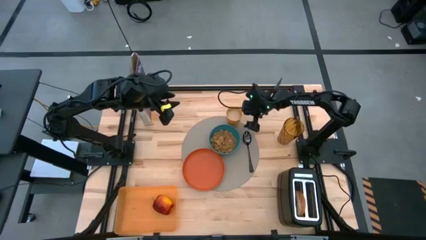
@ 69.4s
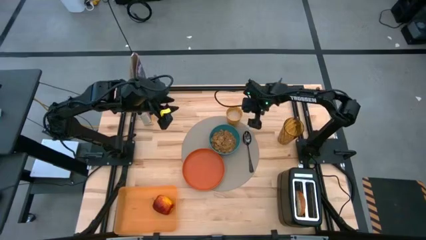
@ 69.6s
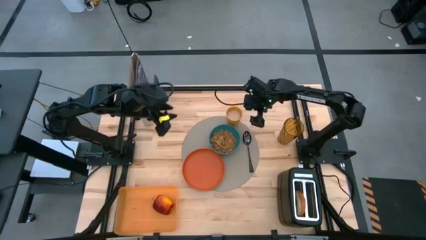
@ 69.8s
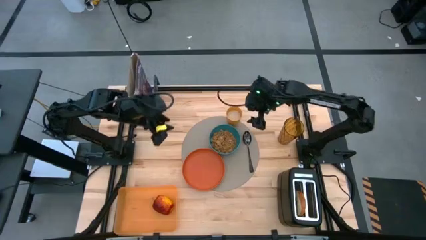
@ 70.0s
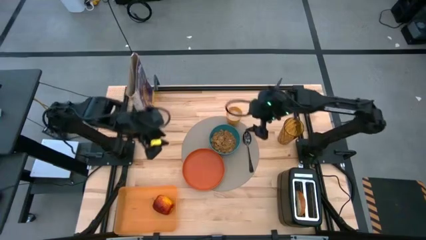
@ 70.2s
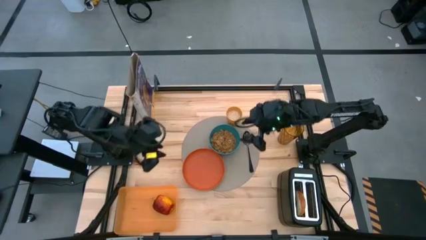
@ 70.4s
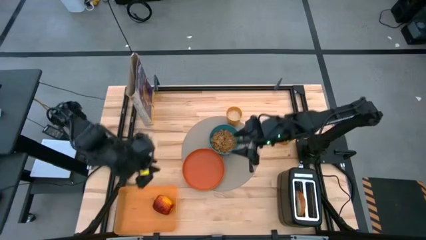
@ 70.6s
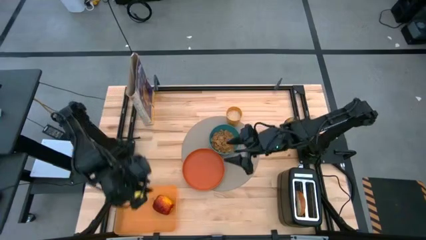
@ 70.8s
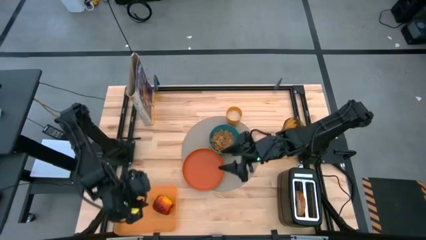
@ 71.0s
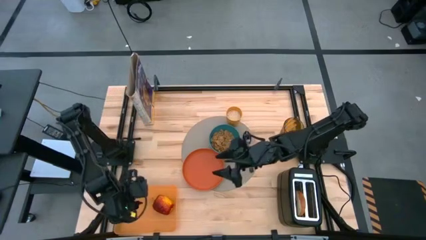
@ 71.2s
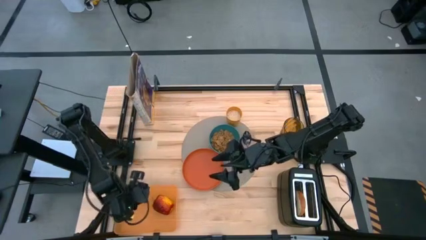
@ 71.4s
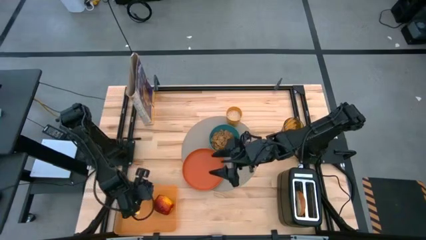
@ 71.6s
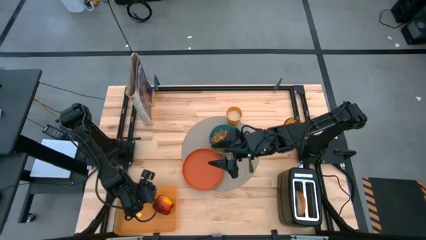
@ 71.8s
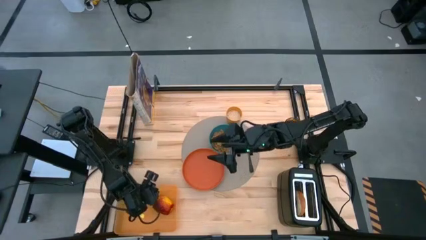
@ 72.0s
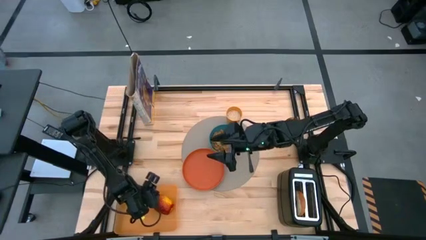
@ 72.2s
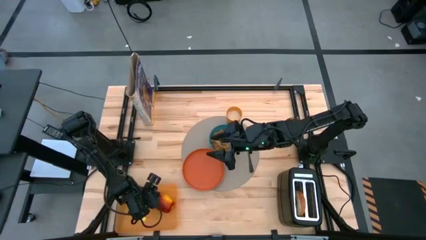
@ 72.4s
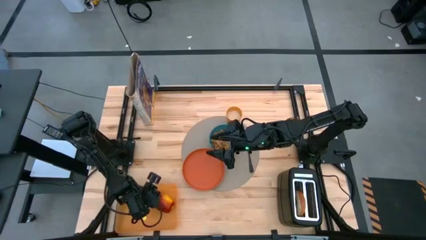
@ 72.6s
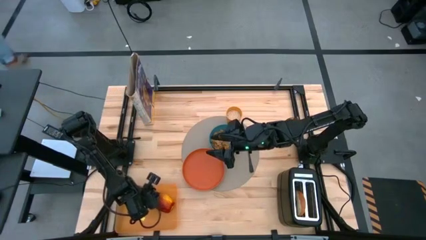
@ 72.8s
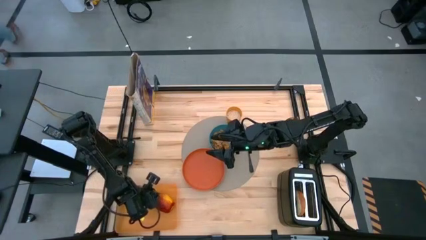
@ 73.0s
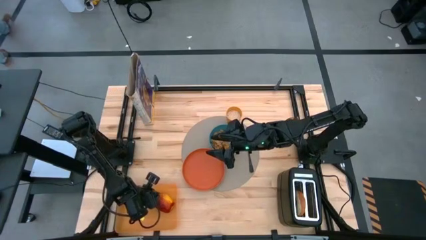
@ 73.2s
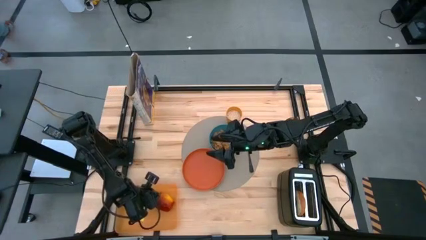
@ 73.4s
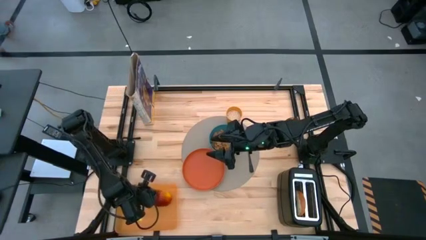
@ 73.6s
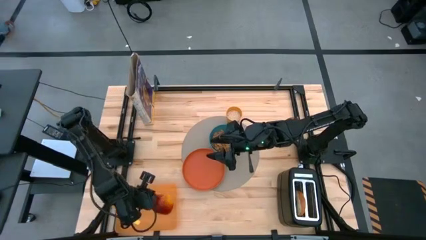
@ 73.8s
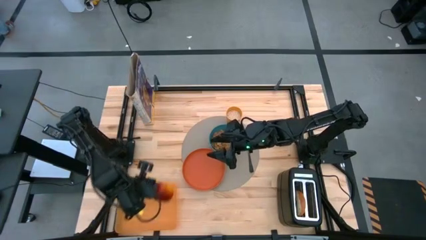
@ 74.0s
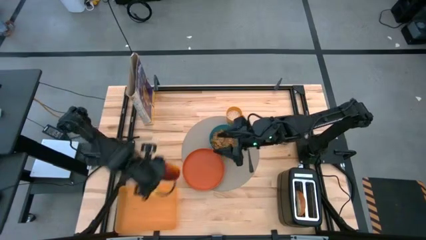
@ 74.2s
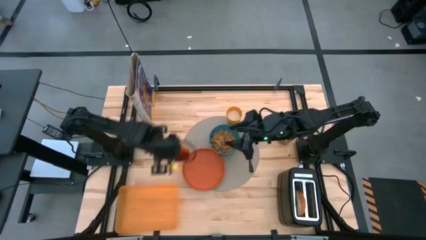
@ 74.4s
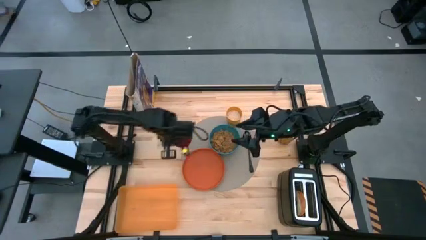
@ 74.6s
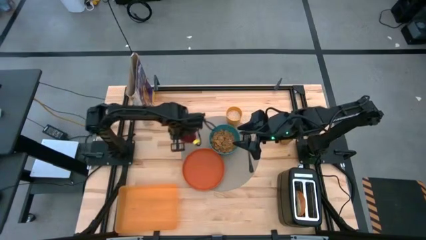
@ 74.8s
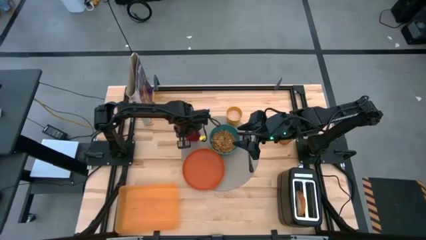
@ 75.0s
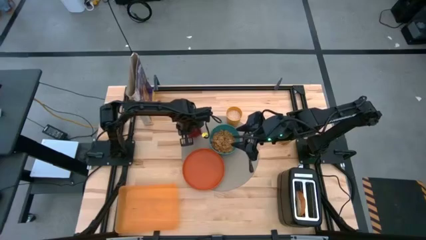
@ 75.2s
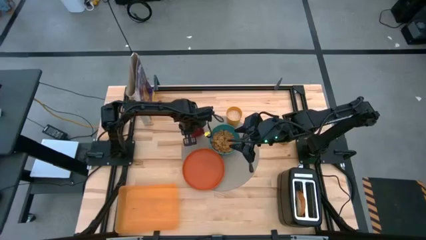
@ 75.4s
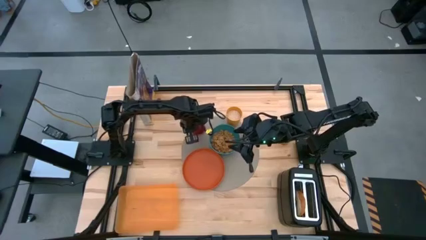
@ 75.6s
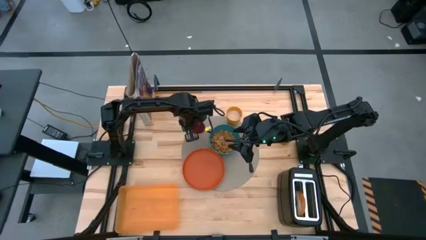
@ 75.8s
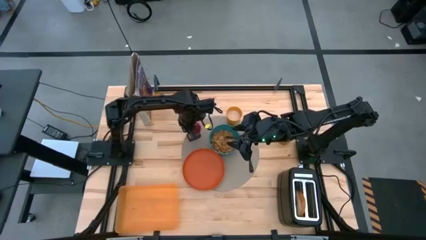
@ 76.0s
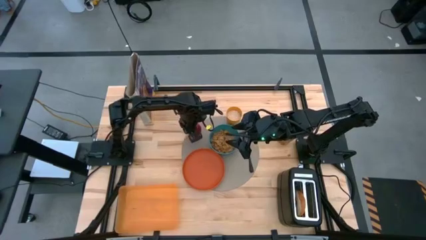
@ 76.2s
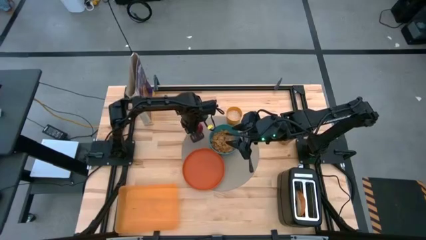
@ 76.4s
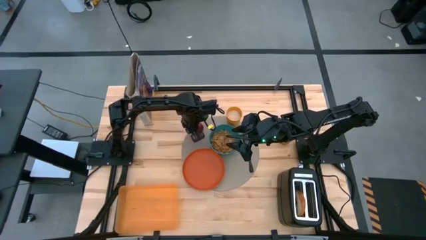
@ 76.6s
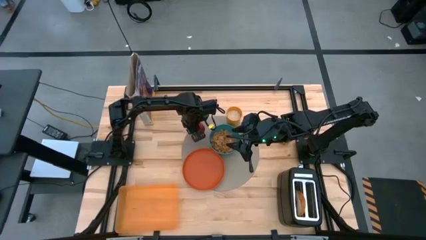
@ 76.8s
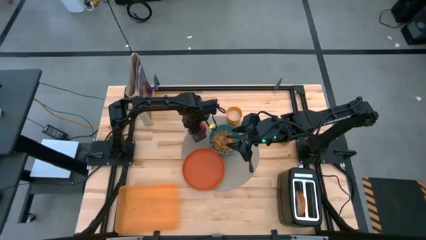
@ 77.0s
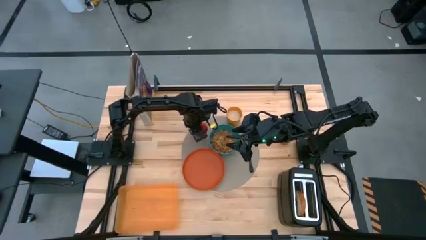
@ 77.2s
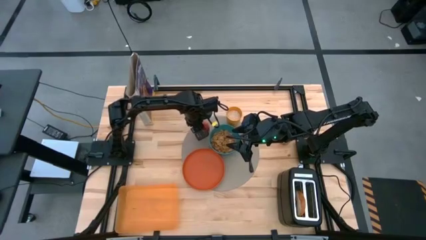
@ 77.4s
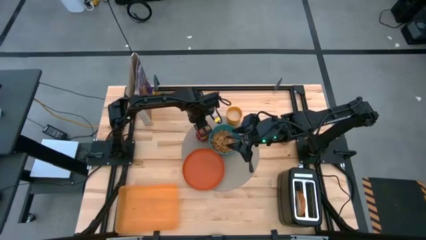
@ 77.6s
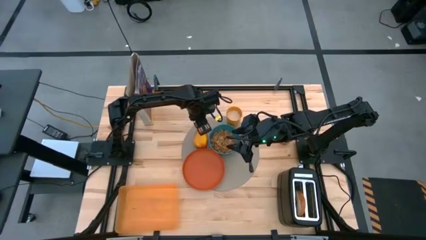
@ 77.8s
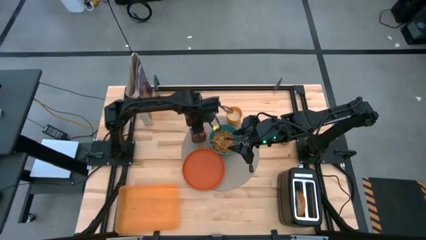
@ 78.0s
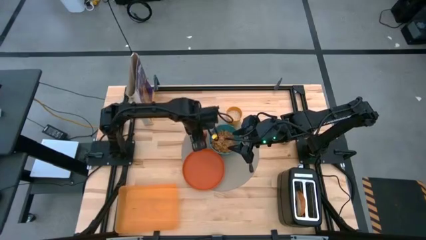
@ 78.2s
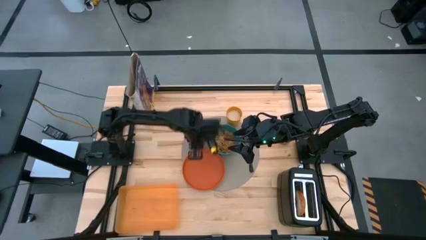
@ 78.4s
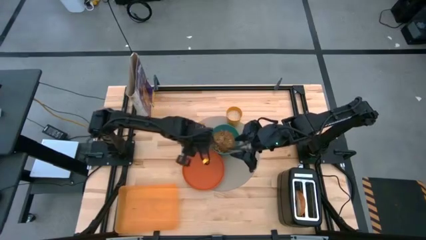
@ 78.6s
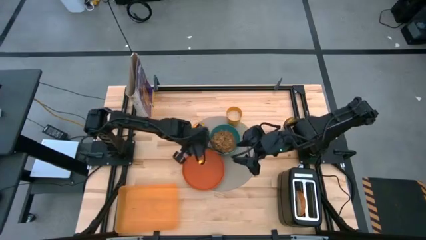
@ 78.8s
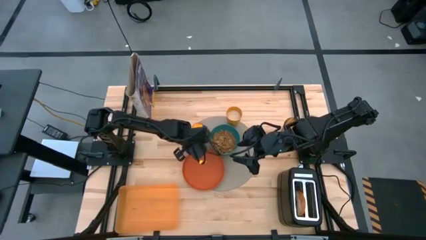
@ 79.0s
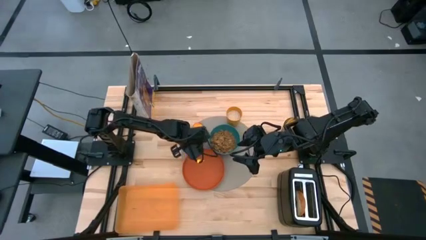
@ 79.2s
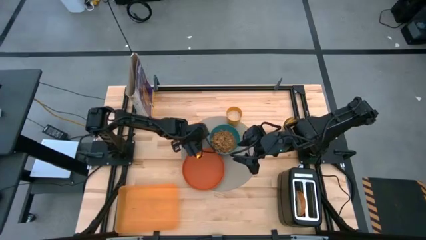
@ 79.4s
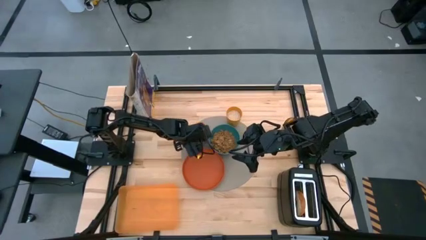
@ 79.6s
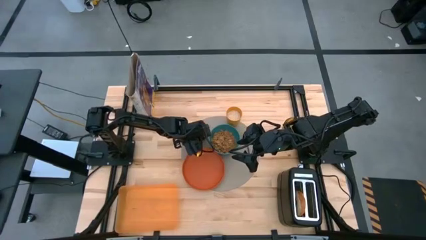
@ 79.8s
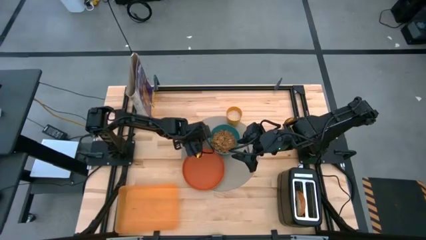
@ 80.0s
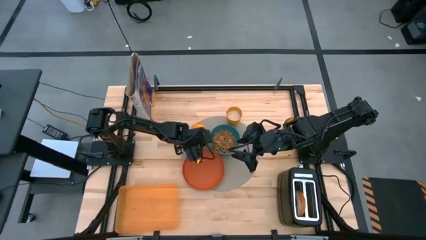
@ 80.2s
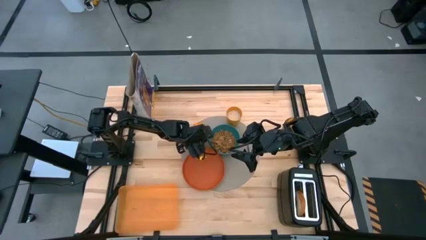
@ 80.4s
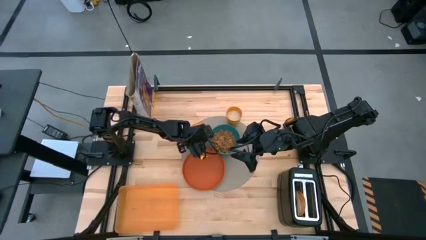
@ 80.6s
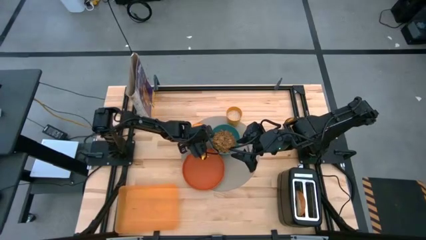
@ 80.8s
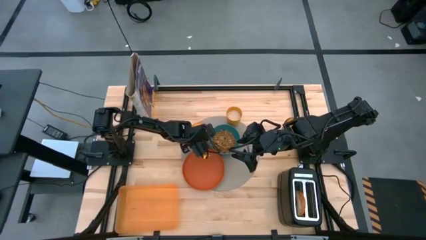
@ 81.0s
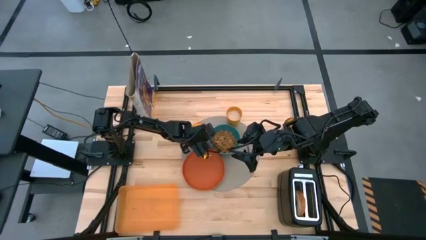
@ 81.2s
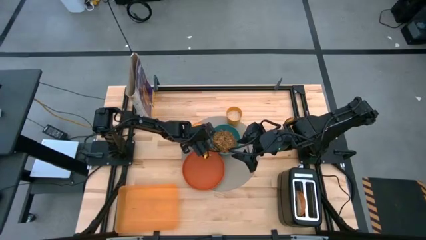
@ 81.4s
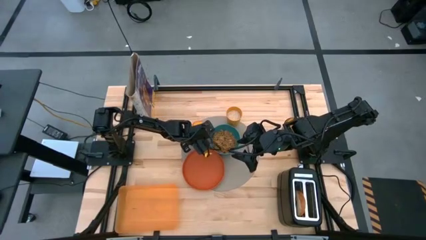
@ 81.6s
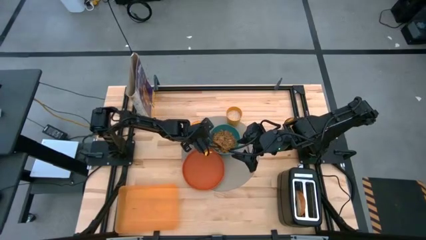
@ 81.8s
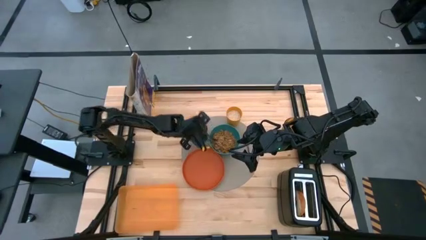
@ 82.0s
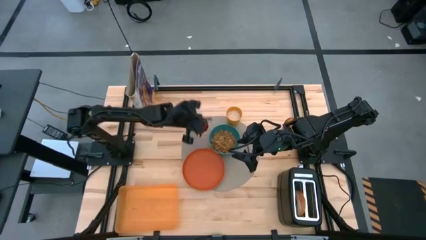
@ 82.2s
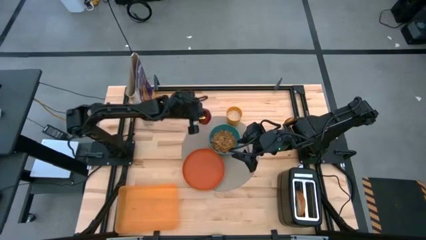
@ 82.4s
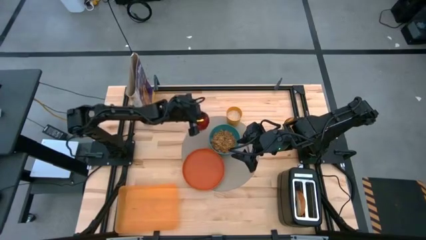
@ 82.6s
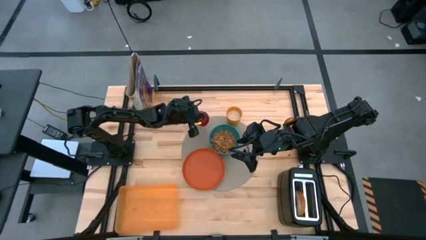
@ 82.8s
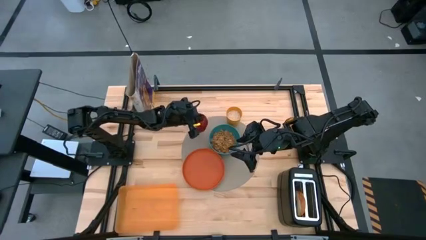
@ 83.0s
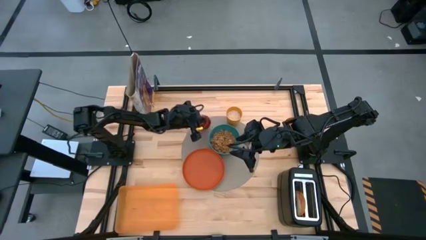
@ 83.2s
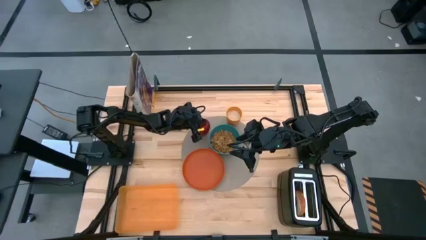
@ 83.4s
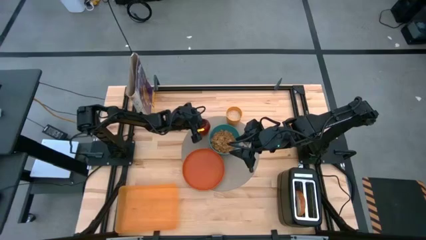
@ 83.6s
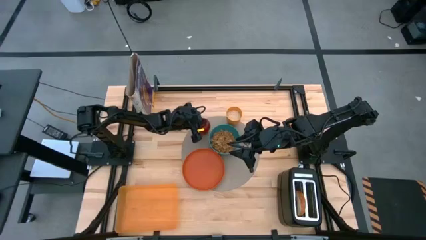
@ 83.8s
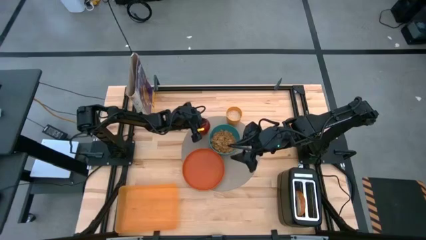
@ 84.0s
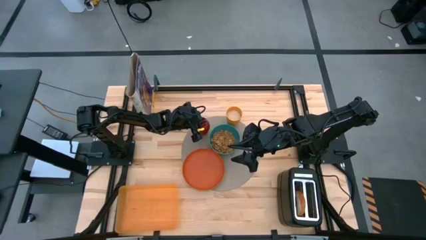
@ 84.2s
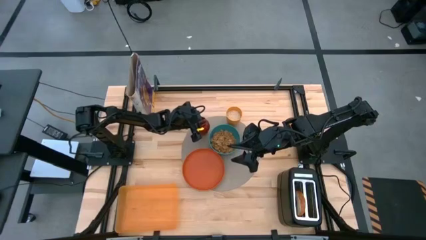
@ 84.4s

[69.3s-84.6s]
Task: Arrange a breakfast setting
Put the apple on the placemat left side of the bowl

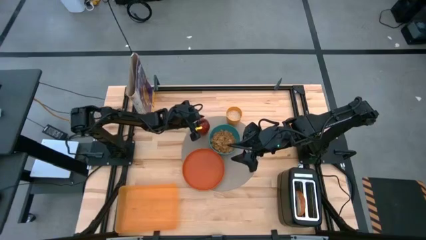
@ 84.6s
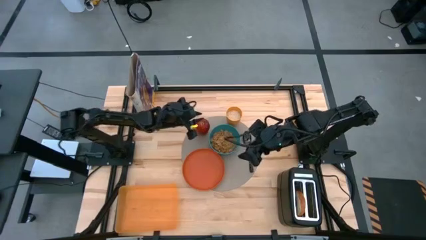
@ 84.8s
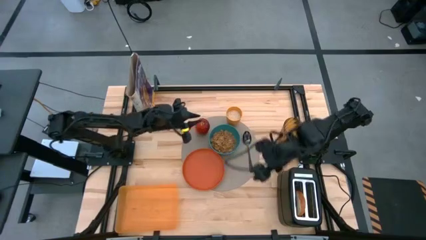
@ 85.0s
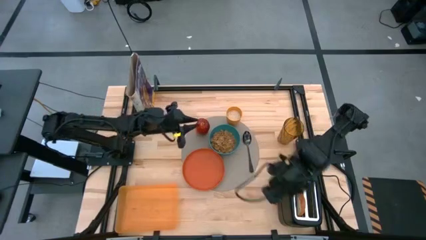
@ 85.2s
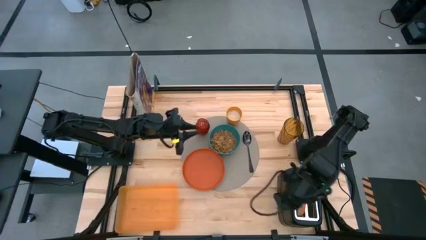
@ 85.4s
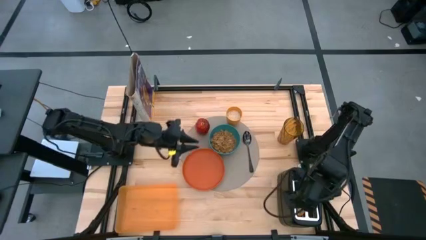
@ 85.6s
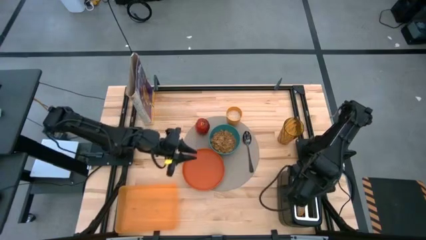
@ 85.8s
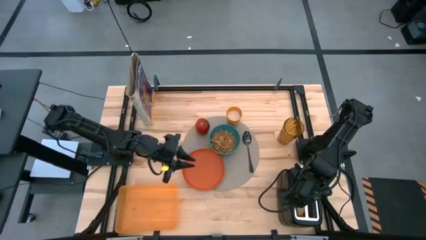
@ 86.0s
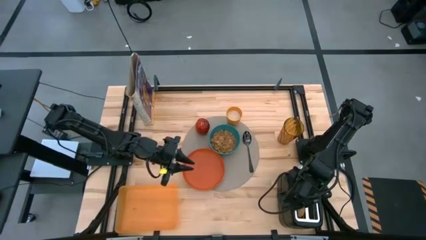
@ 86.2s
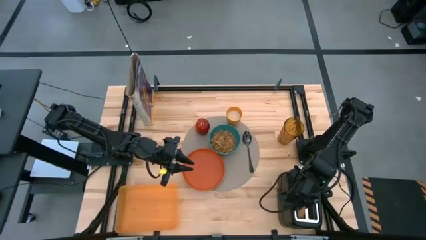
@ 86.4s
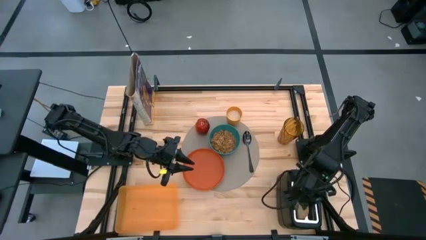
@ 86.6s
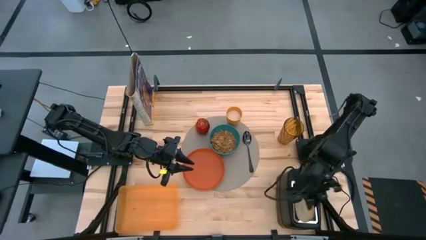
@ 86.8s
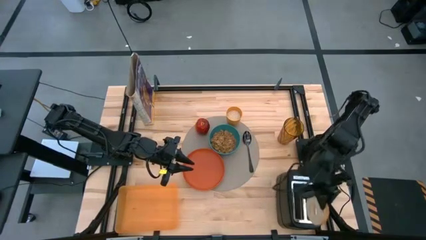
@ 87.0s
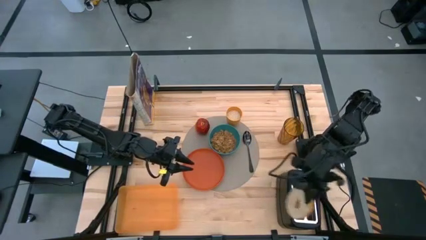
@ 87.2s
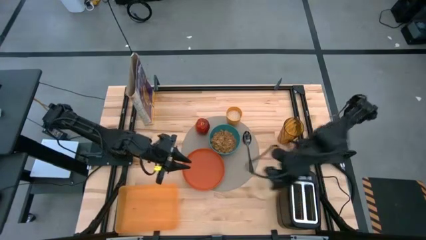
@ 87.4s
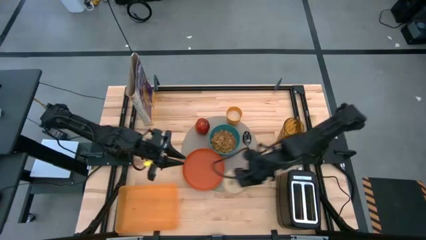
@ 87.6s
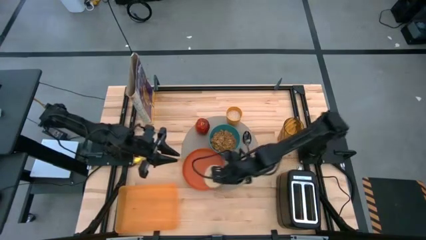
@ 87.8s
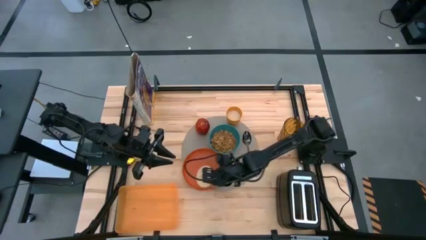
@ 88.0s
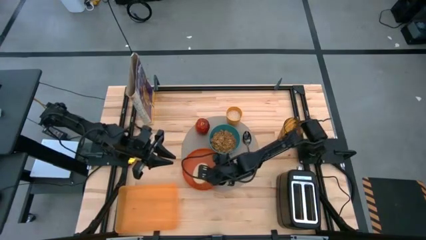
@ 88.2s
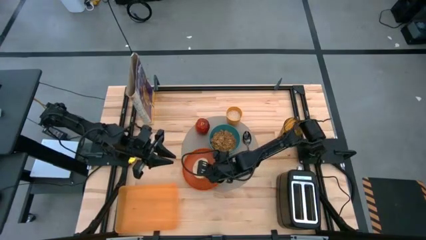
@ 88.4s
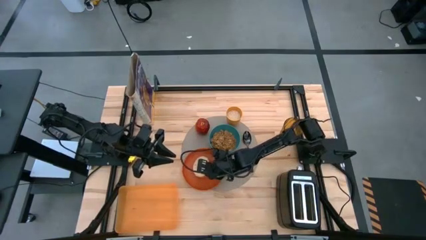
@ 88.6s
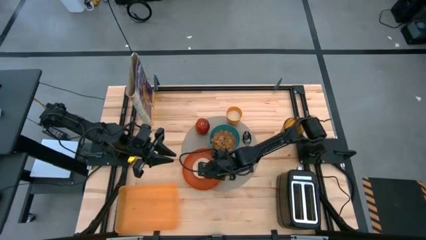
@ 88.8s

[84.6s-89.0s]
Put the toasted bread on the orange plate
